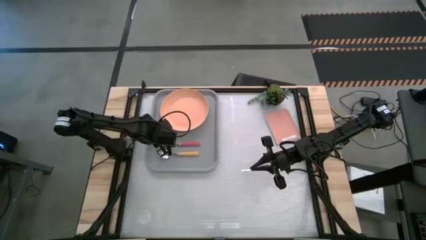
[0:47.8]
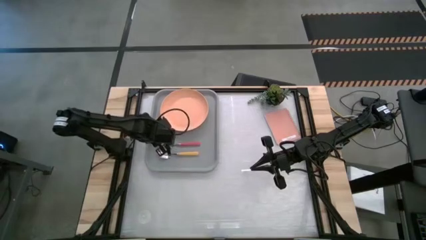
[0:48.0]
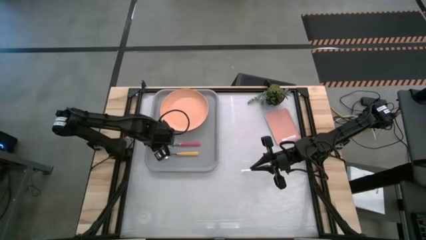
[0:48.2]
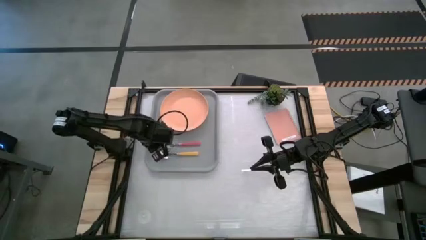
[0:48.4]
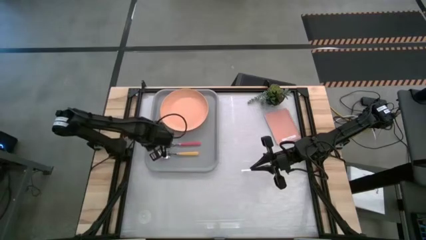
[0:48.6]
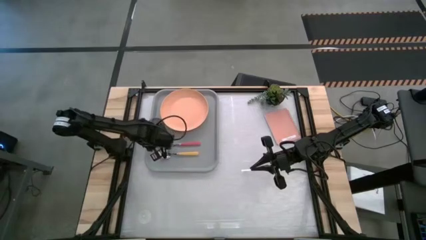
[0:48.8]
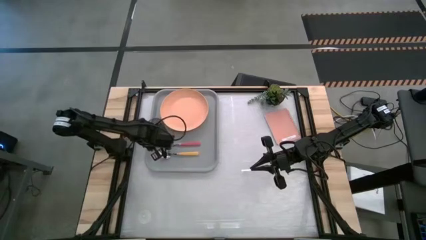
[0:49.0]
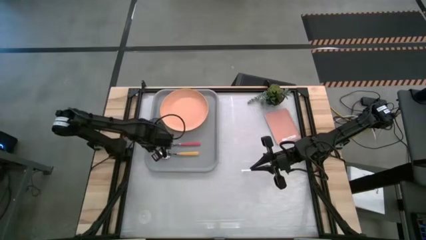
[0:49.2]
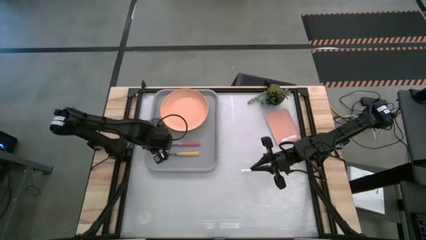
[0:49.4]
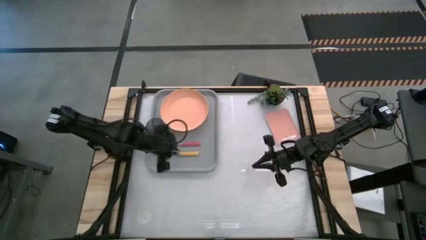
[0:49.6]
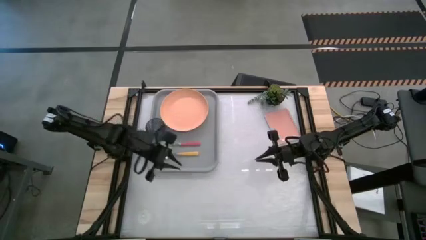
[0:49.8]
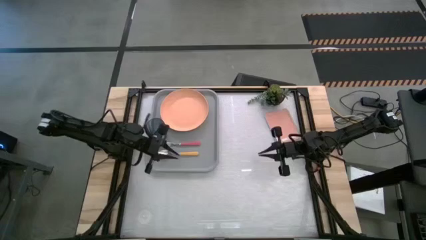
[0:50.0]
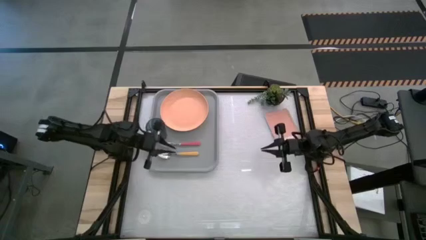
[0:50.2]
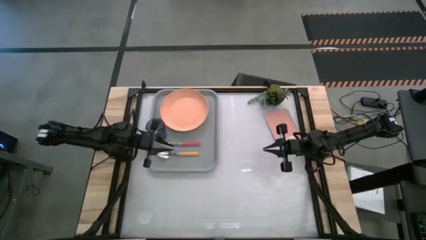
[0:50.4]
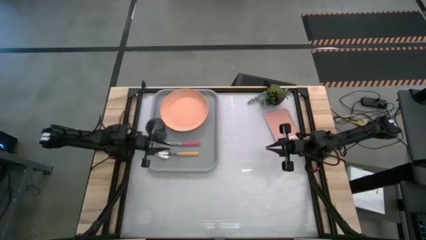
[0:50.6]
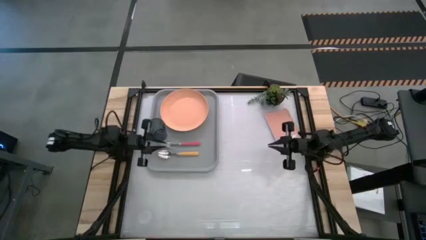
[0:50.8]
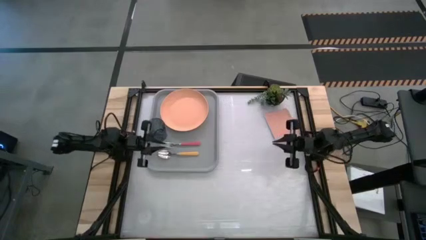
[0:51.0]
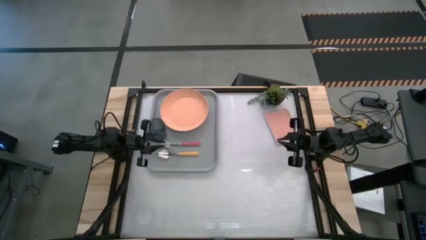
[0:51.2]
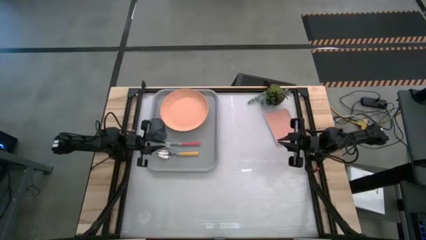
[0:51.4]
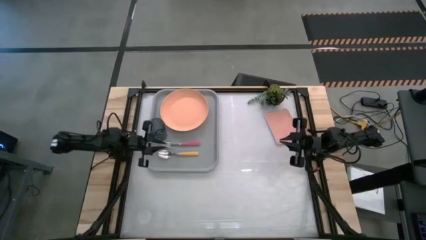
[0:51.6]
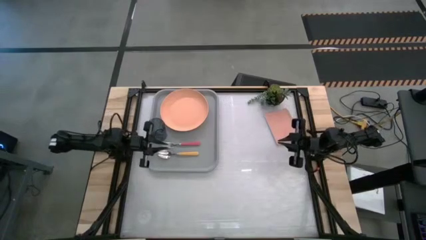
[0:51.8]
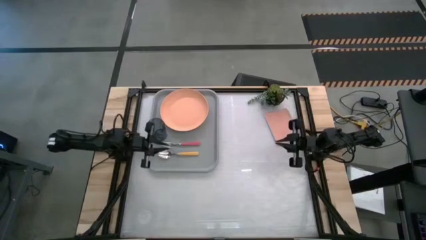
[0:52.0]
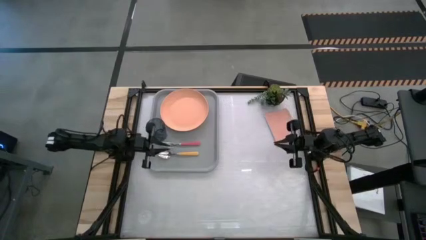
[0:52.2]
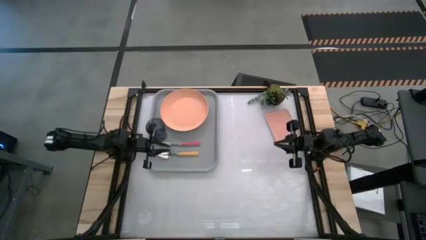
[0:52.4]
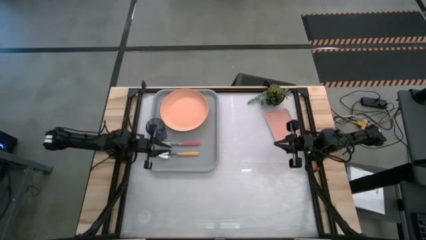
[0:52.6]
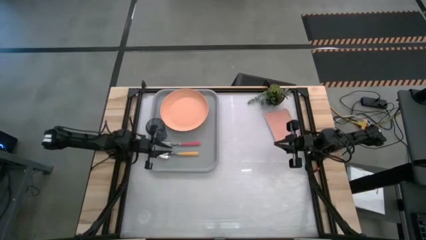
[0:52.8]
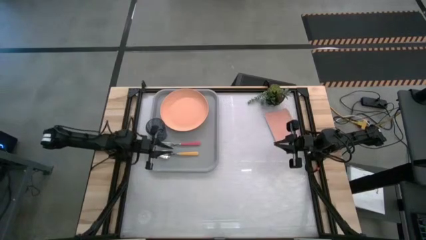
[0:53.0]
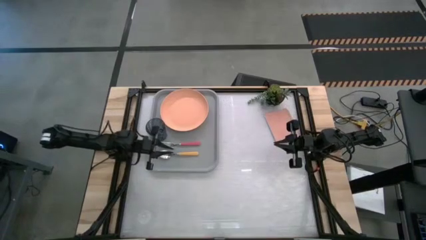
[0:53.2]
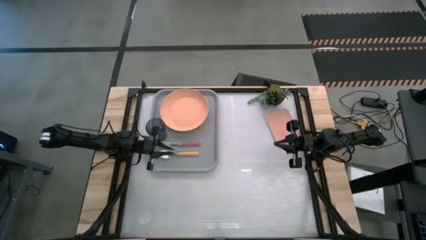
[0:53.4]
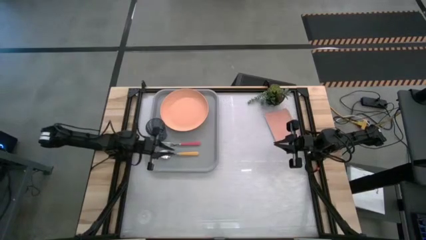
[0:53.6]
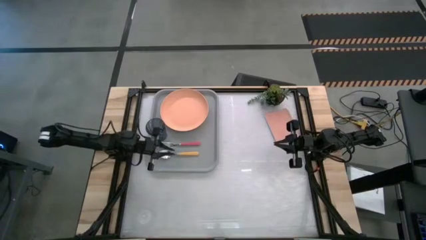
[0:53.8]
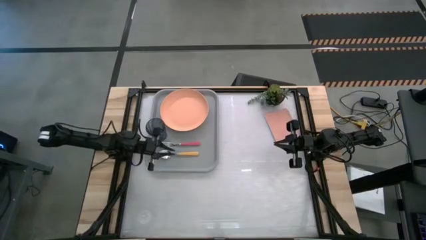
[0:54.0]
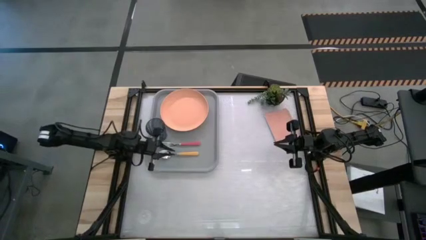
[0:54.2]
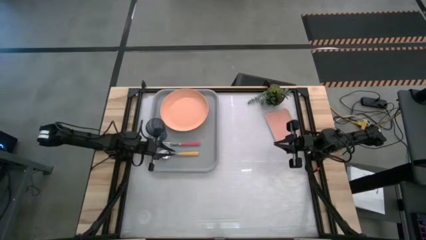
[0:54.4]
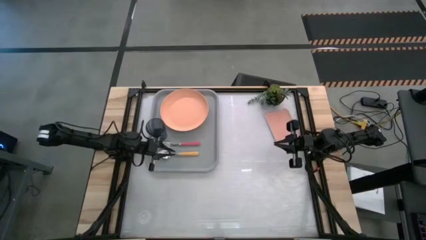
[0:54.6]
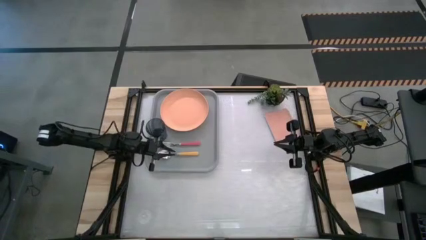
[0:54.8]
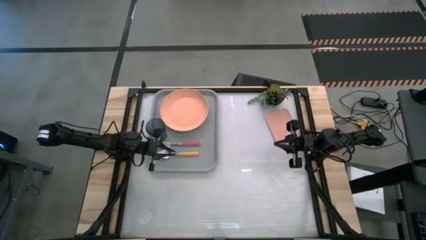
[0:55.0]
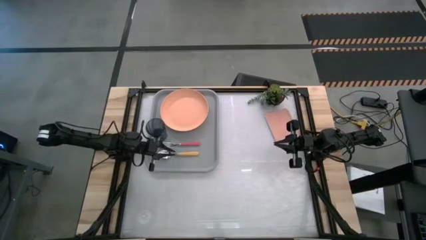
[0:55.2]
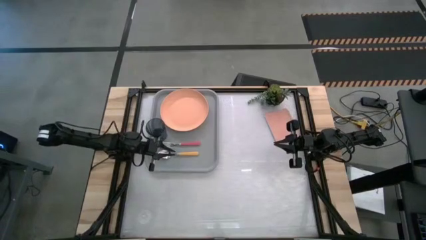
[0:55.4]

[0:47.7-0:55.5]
Task: Pick and place plate/cup/fork/spoon on tray
Return to Home Position

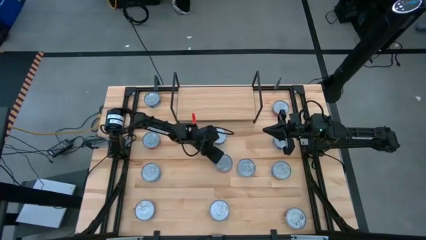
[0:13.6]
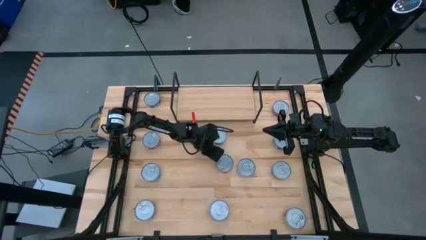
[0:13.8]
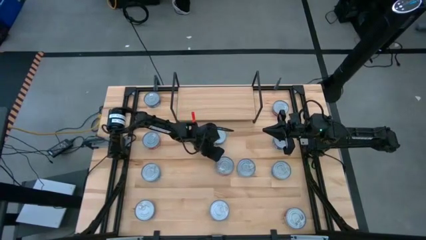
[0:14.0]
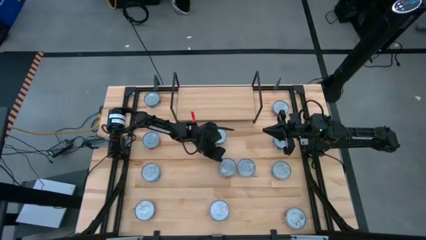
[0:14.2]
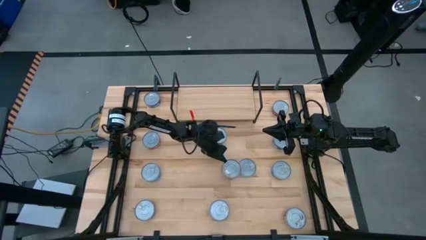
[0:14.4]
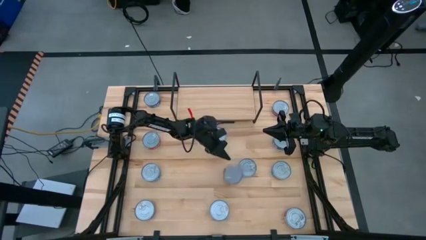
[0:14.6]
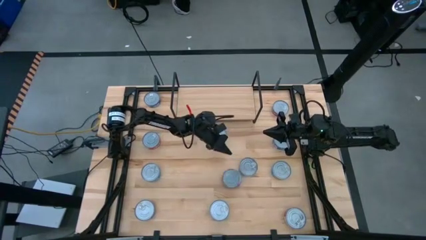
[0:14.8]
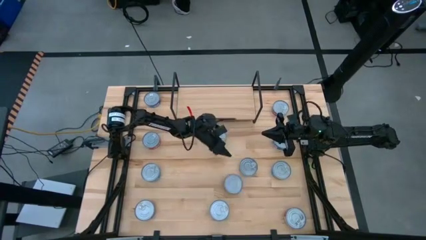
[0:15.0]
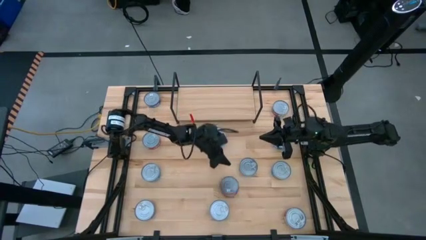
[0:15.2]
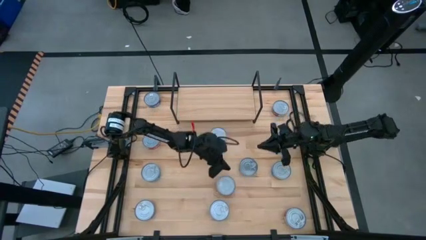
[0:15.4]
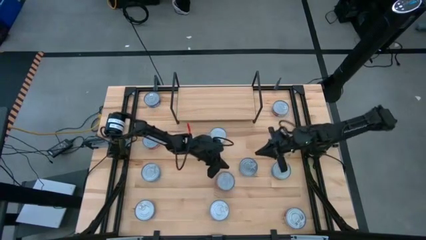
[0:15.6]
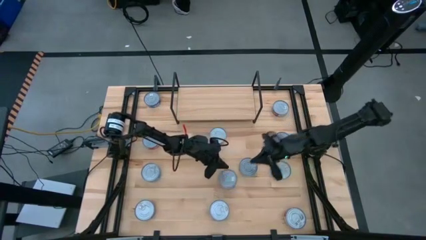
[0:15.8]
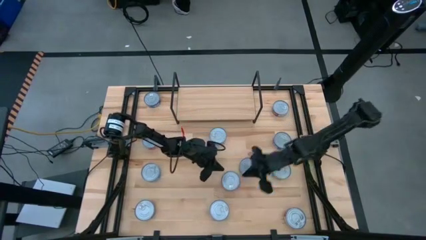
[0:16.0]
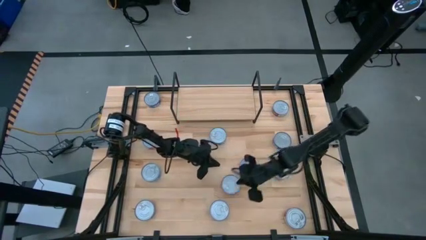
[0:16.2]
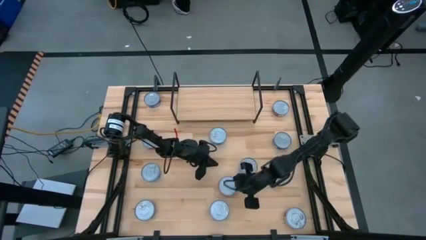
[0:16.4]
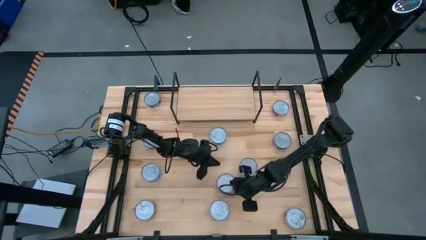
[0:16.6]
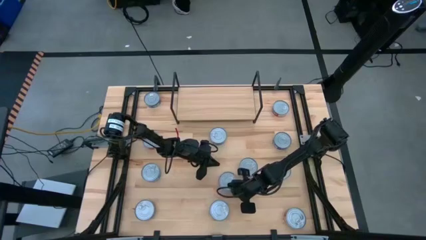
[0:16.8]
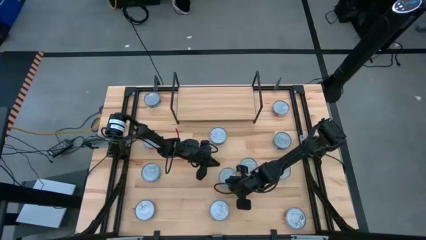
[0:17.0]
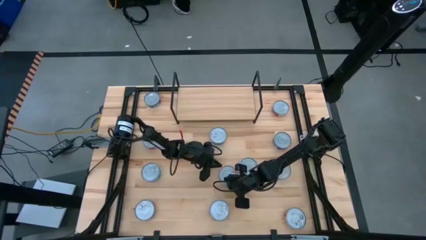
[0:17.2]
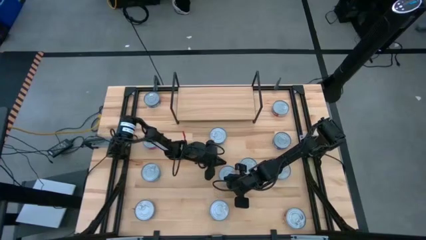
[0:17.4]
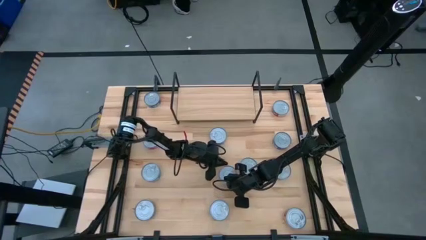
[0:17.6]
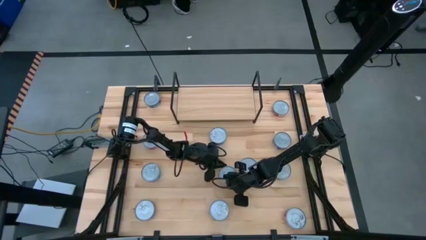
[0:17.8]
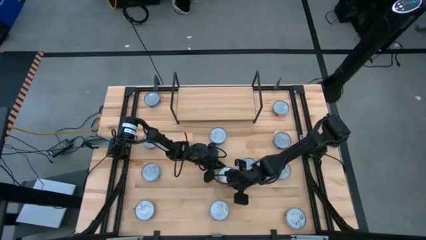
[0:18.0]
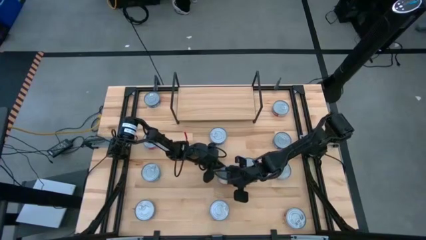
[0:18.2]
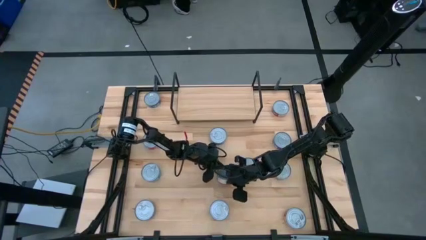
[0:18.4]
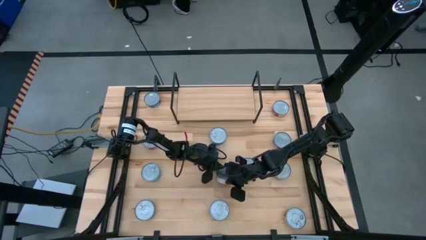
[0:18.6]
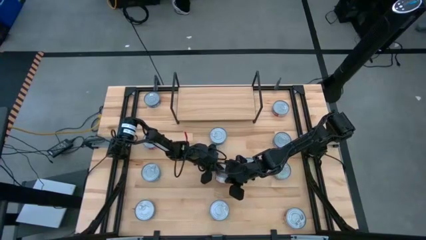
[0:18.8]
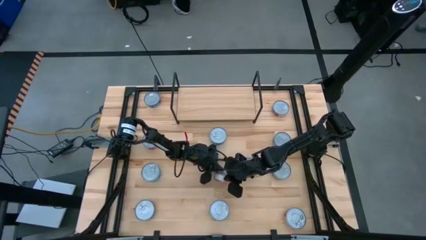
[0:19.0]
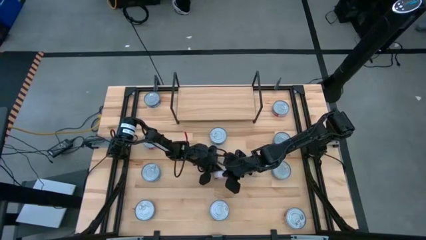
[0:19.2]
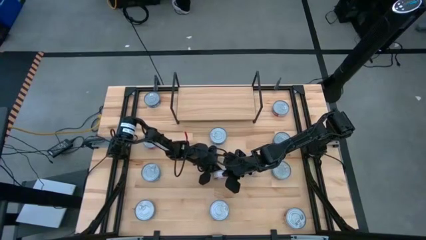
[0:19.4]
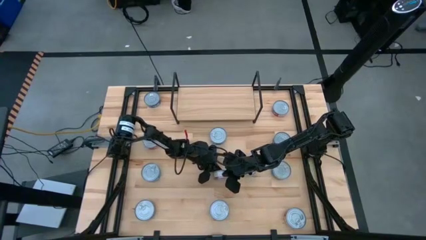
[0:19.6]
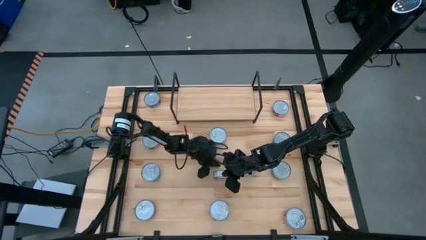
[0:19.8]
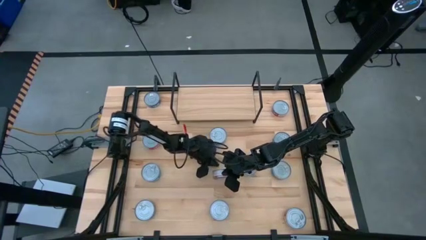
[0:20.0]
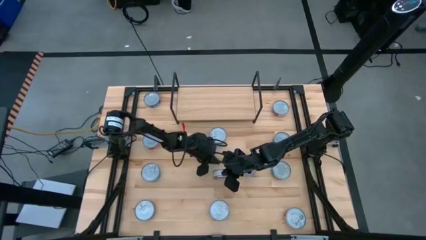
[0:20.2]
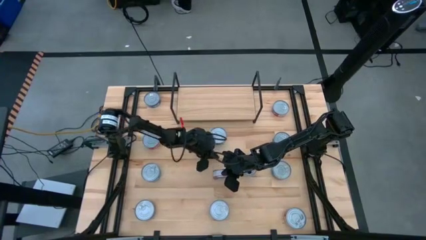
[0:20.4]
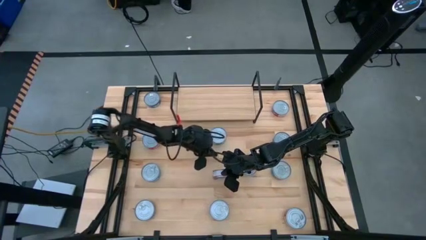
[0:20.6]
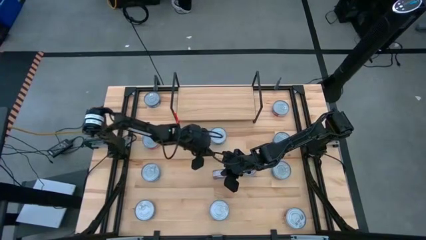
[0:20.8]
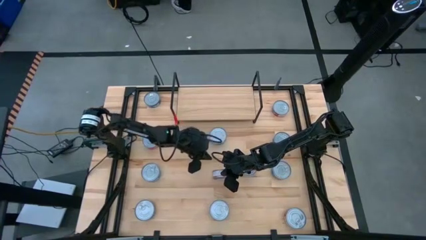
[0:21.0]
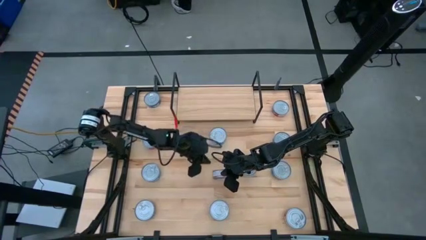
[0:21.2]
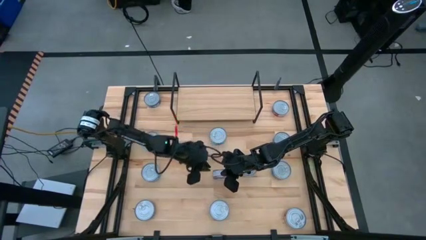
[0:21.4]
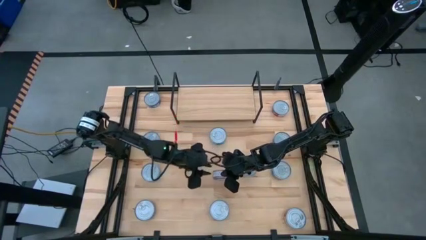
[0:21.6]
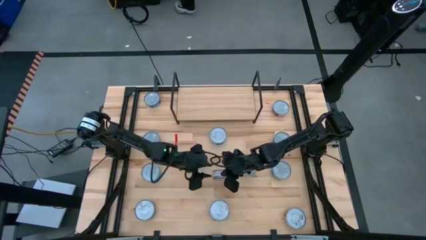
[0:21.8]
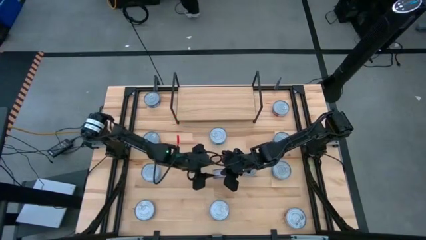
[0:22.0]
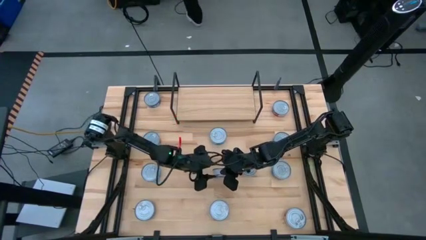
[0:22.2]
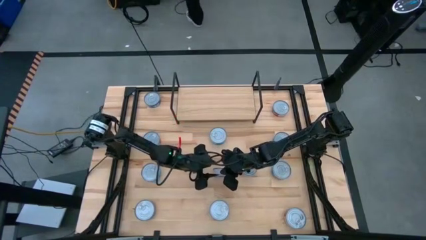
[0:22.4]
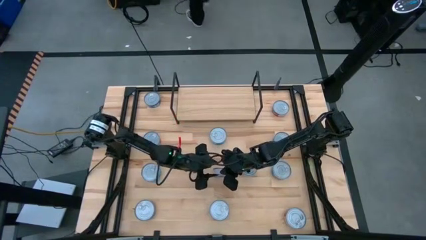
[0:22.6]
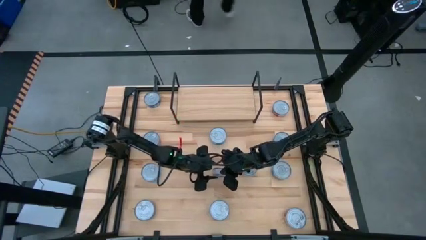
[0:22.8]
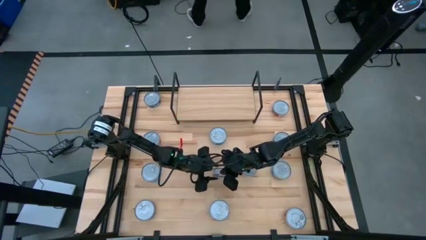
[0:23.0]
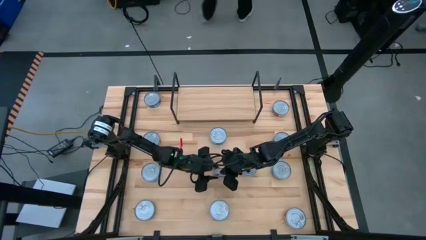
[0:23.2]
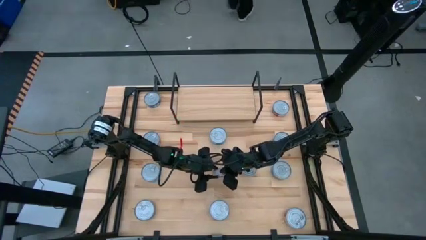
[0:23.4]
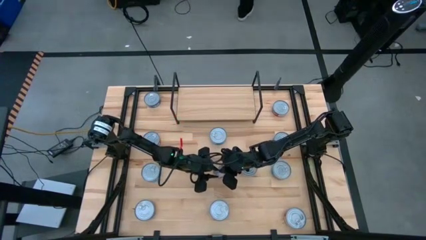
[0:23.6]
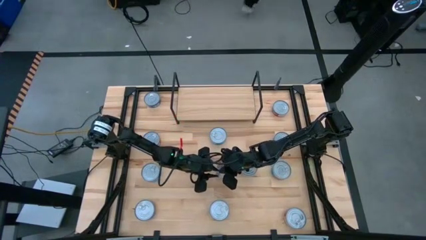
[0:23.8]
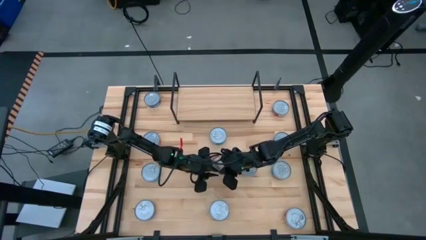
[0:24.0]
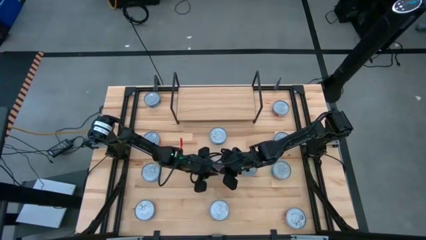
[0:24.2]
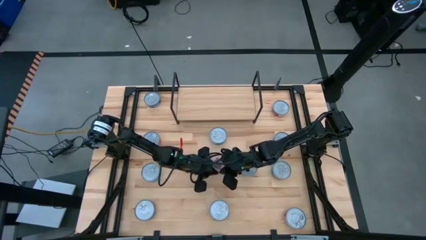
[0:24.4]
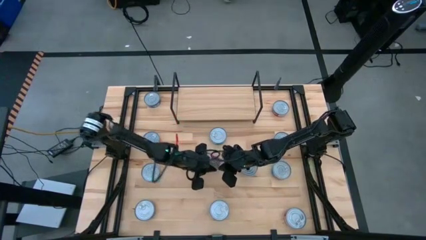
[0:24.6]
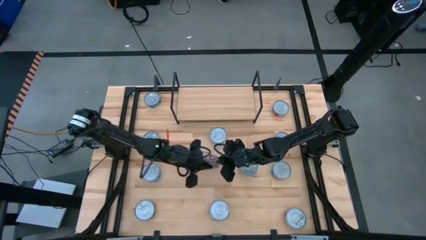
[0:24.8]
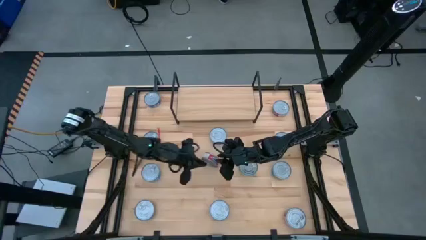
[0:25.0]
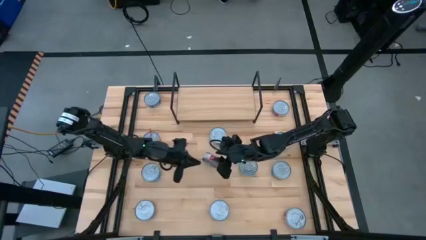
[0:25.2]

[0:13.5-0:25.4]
Task: Stack canned seafood by type on shelf
Put the center red tuna can on the shelf
